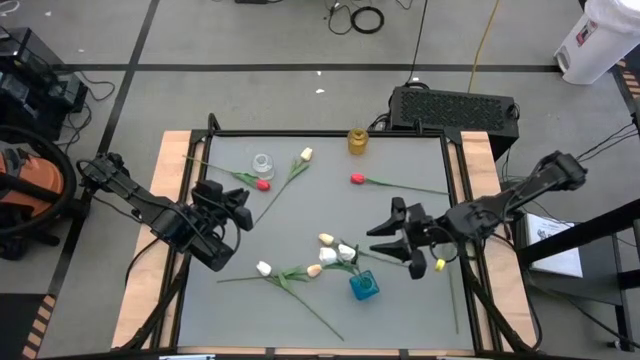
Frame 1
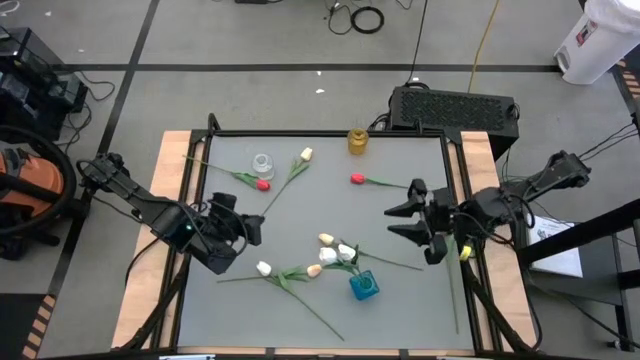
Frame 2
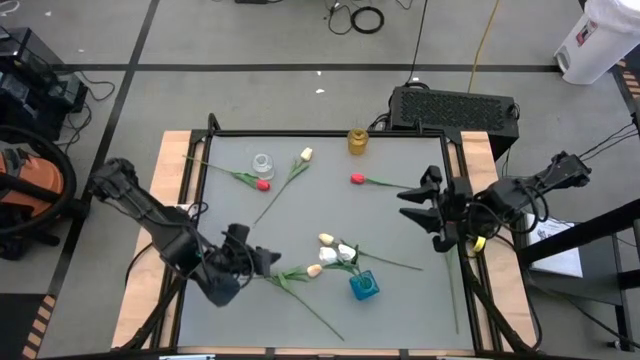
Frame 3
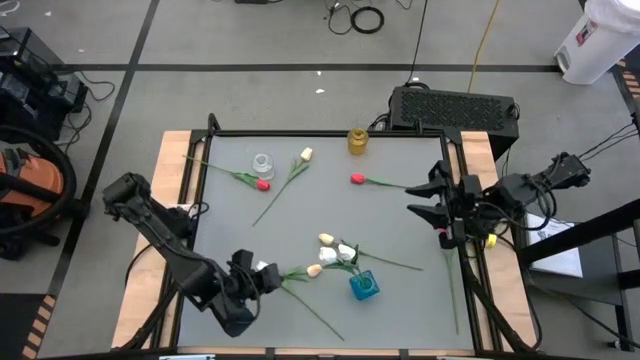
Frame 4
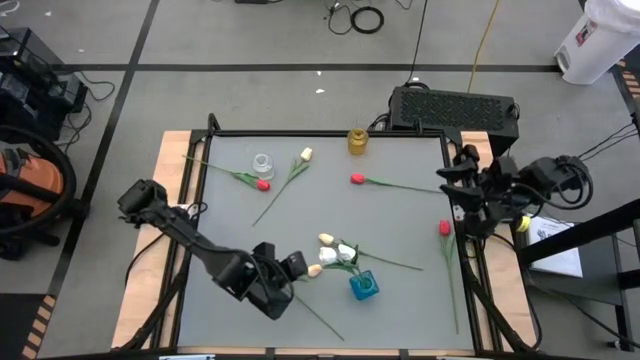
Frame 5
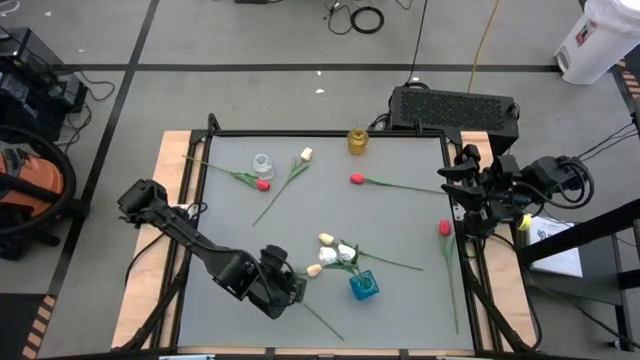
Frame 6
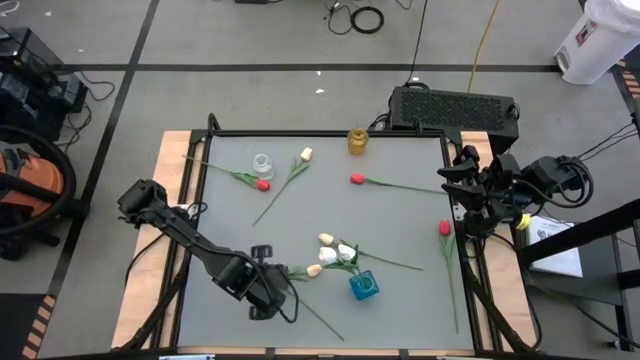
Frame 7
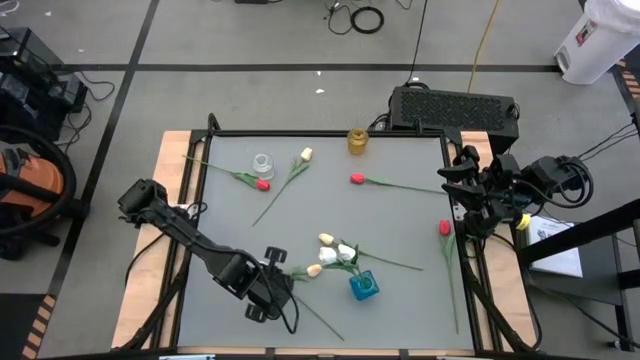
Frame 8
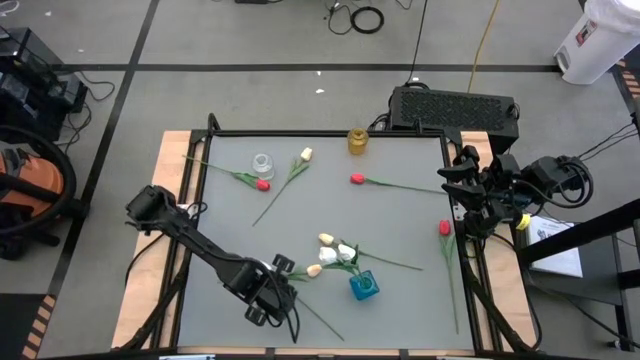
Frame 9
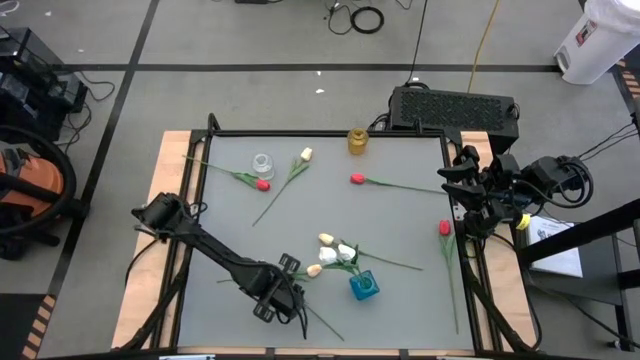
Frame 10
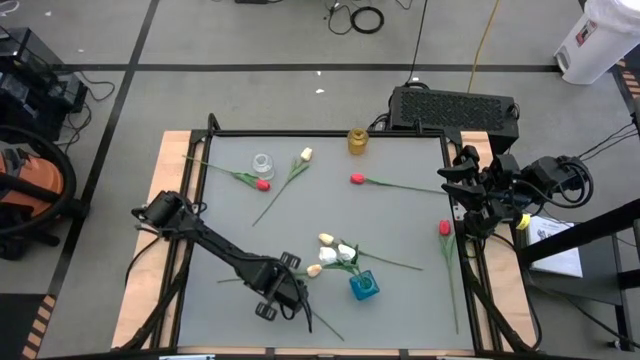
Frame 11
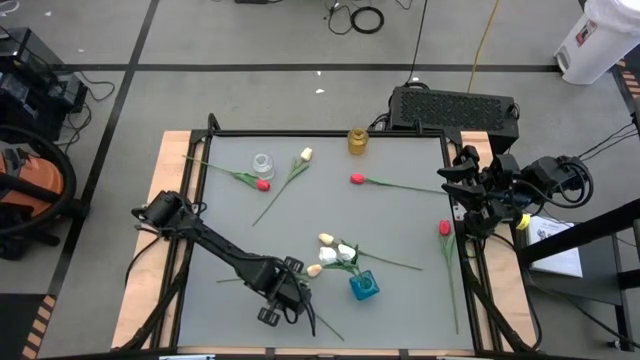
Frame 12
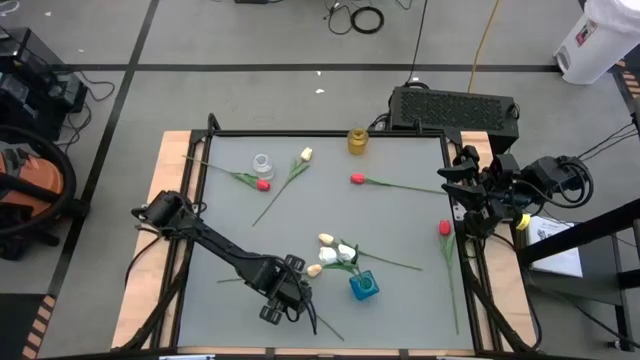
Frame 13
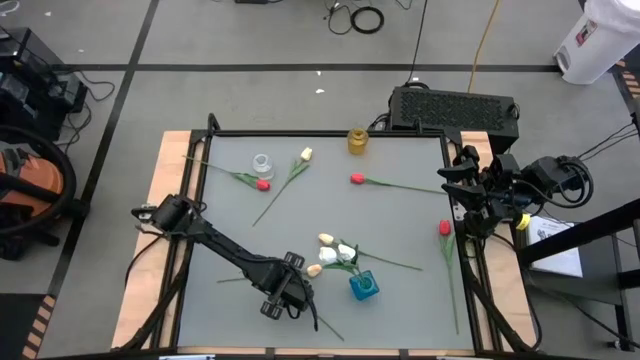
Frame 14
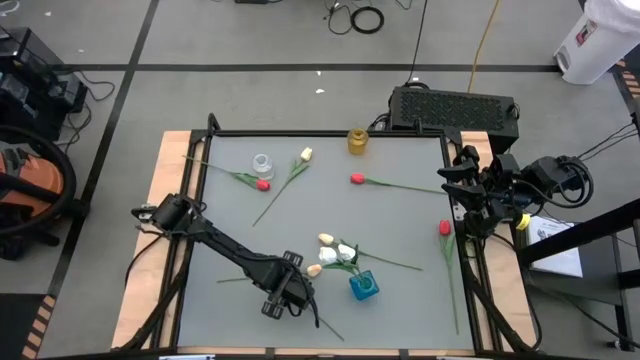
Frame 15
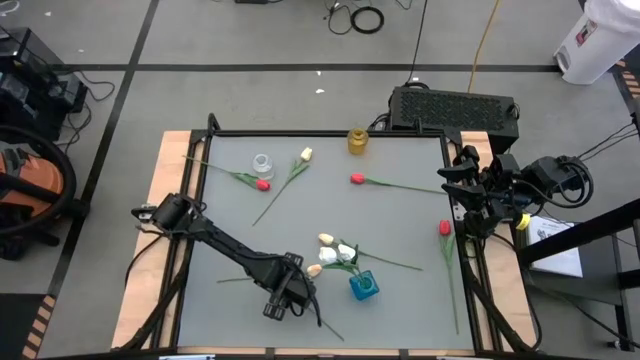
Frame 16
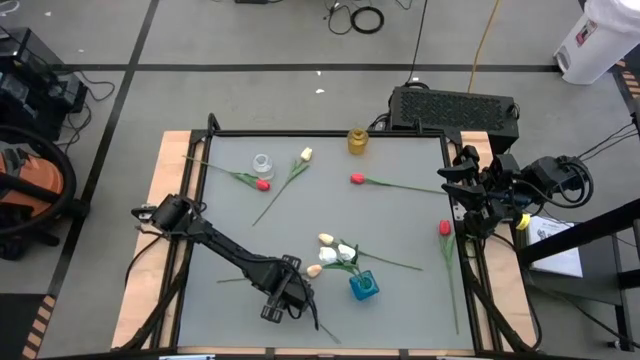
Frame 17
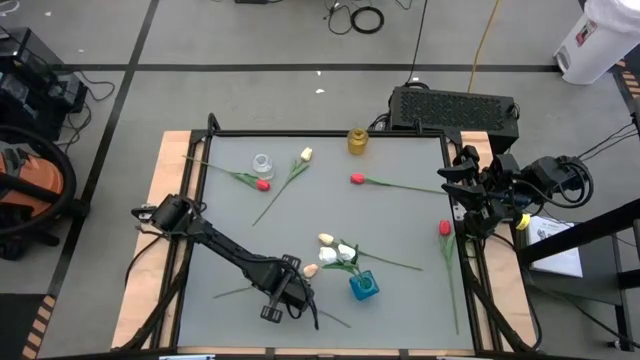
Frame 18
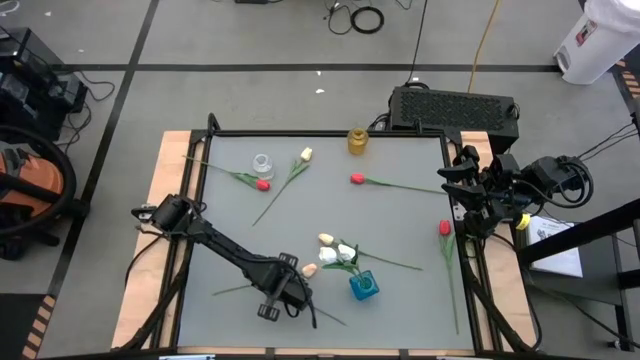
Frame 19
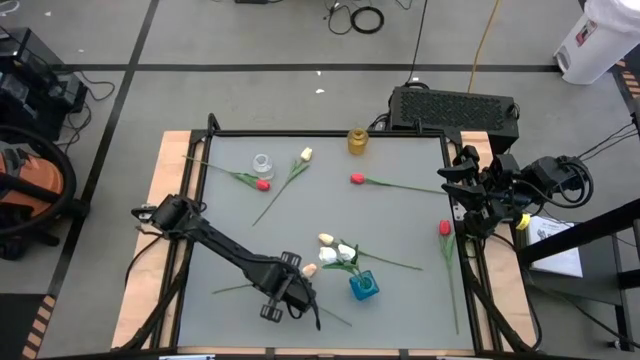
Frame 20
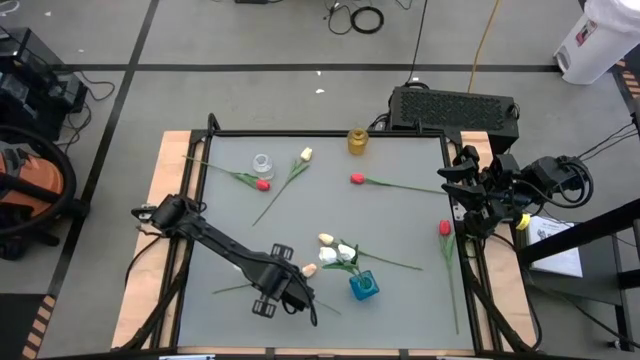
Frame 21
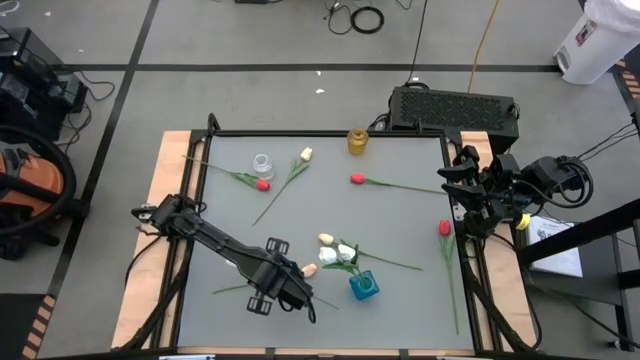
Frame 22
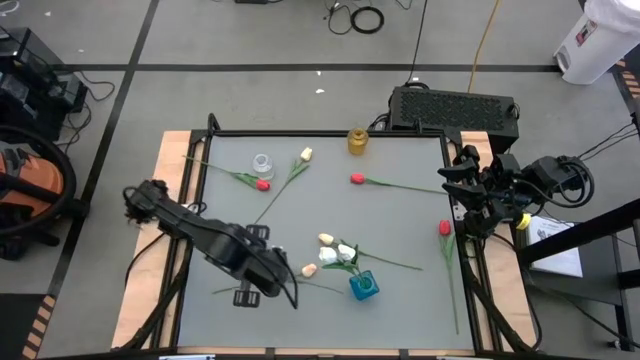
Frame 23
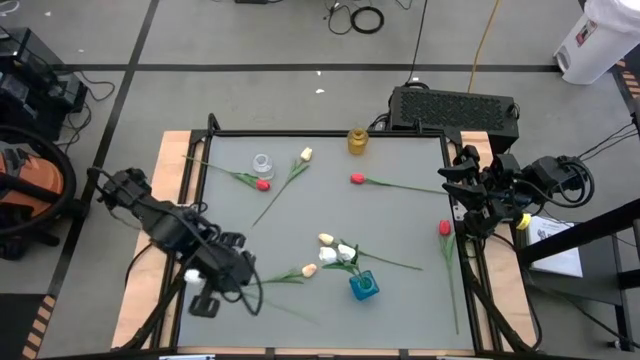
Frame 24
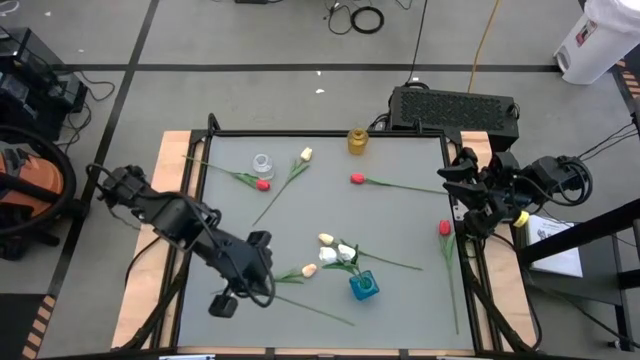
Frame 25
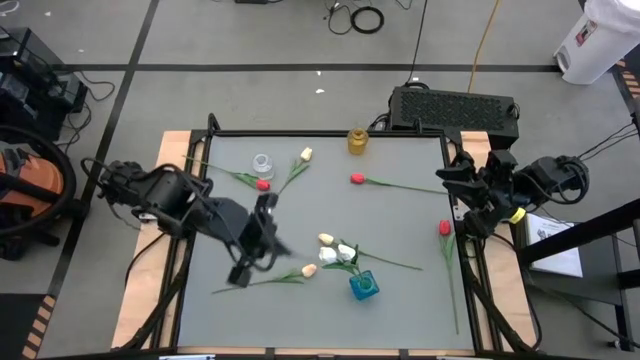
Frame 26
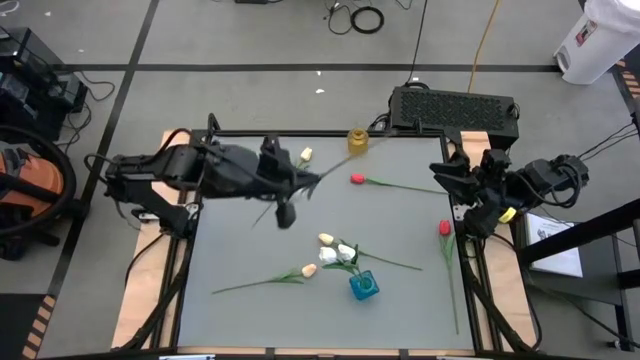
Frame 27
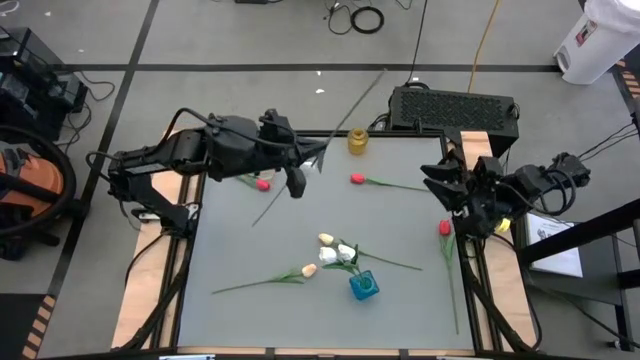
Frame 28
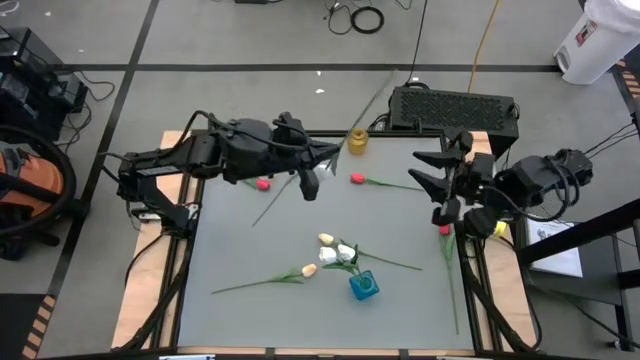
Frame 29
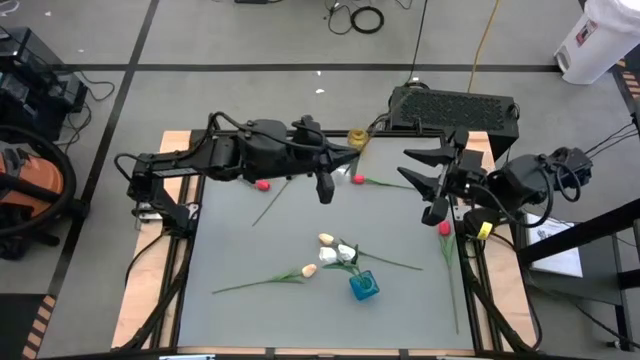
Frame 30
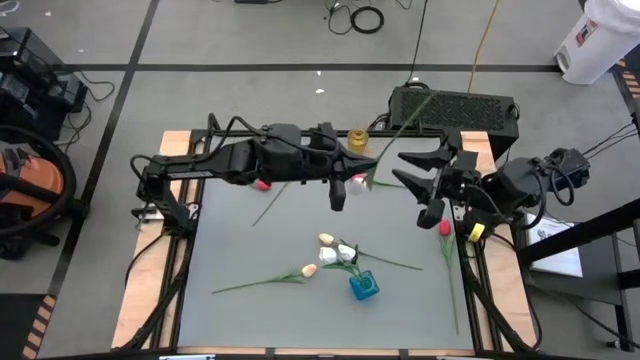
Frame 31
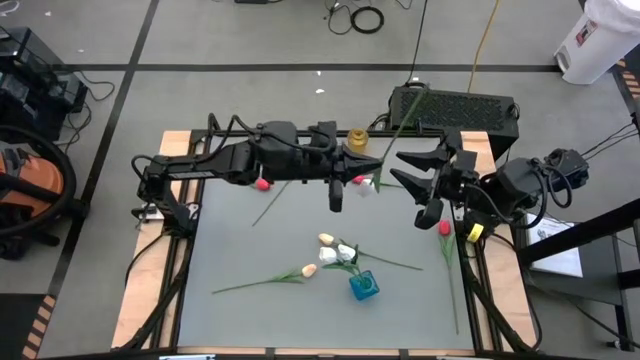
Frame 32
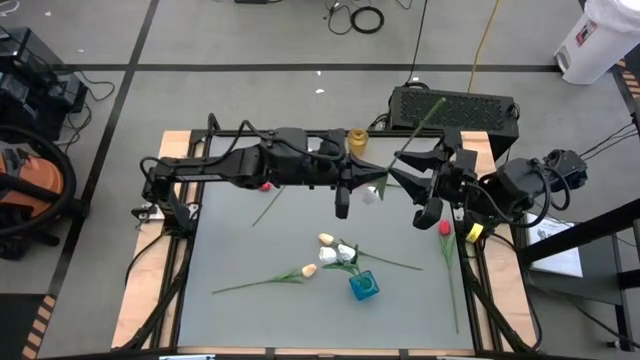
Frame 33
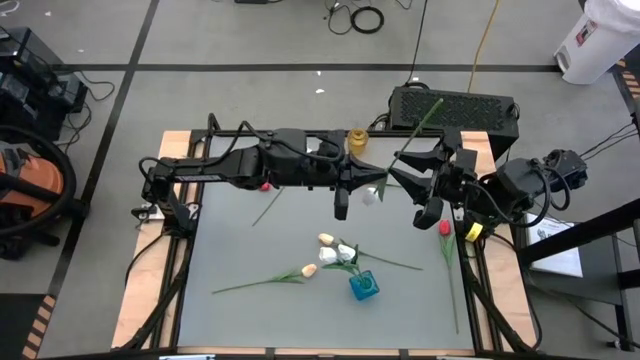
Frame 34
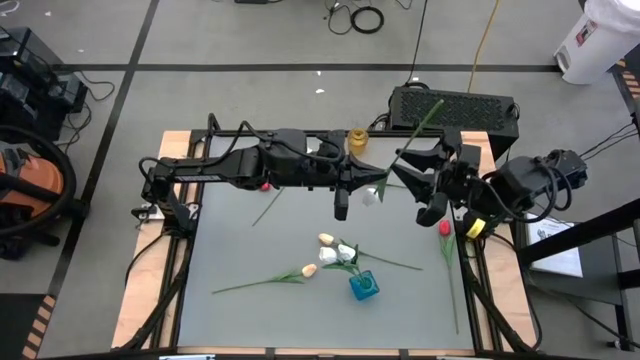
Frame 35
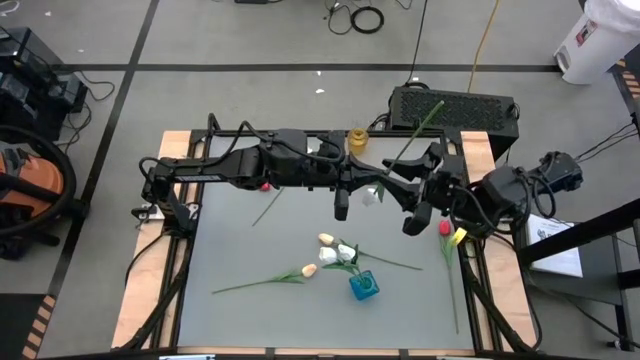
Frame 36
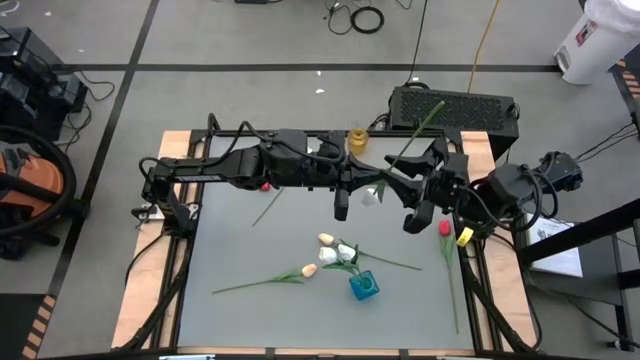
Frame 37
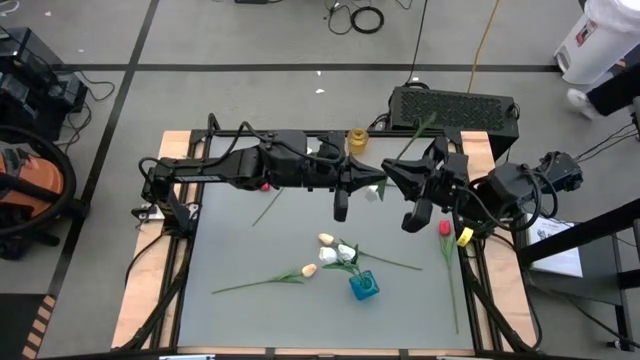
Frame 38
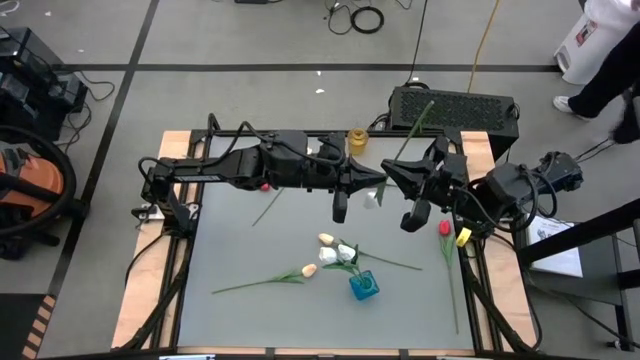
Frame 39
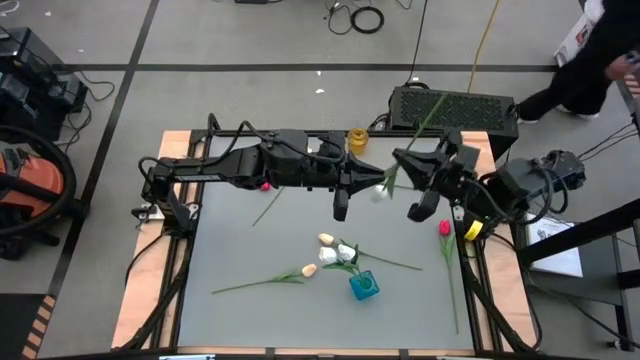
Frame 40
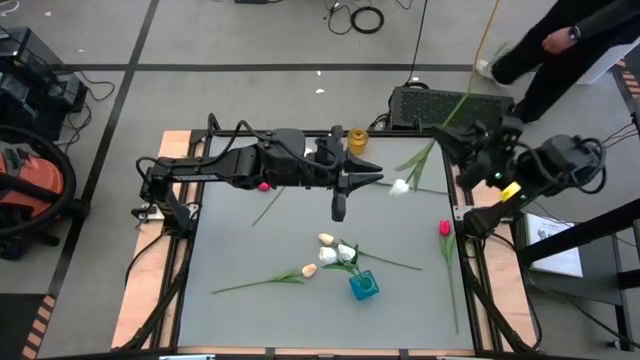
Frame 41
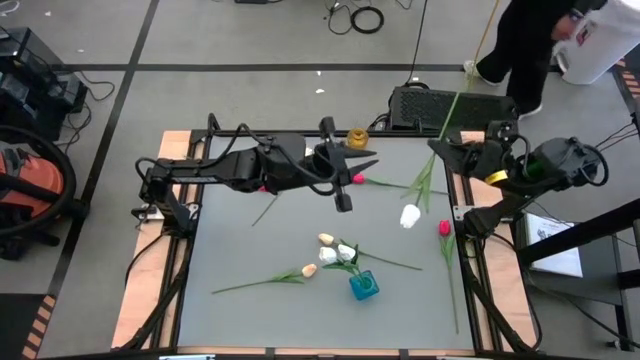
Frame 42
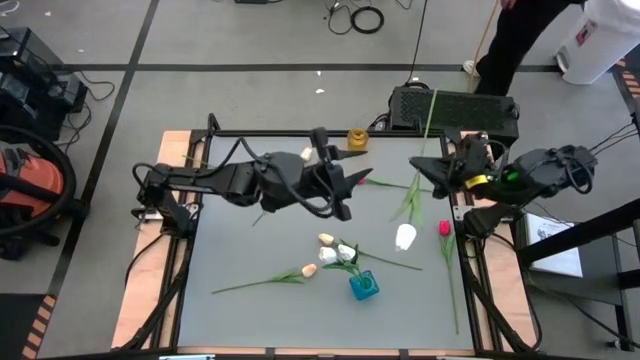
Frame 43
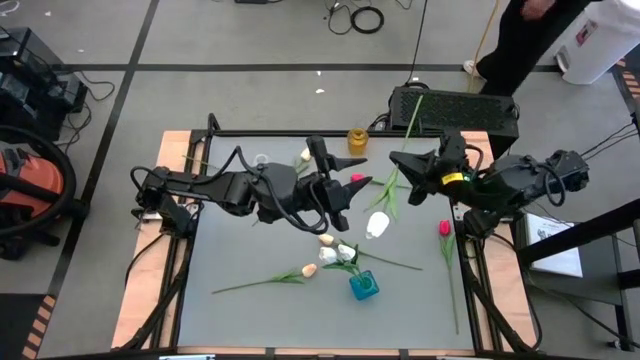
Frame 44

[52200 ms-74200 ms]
Task: Sort flowers into vase by color
Put the white tulip into the blue vase
